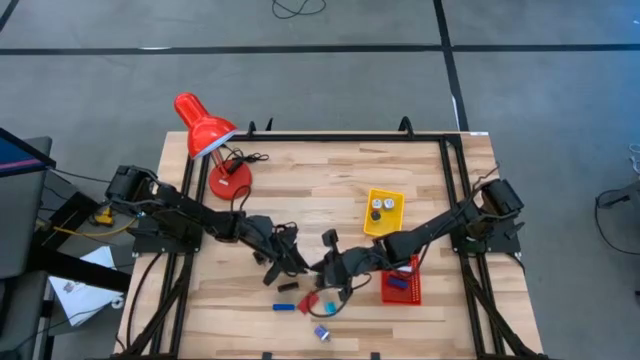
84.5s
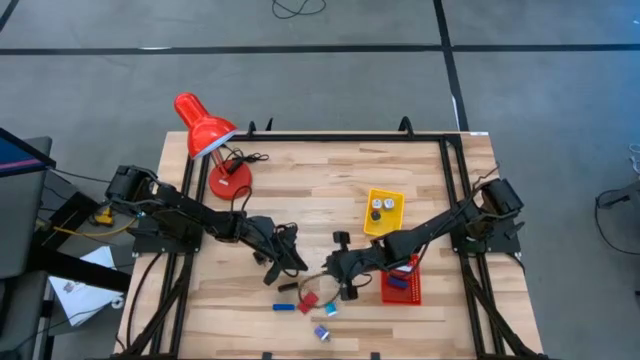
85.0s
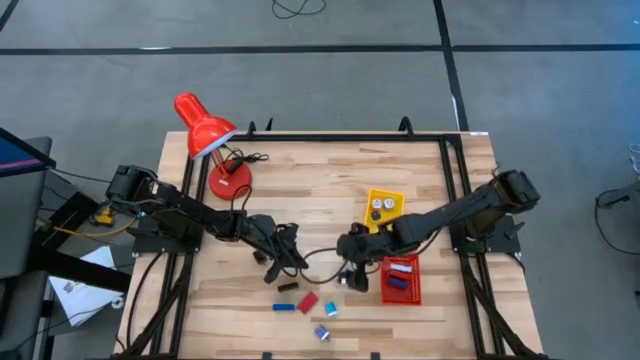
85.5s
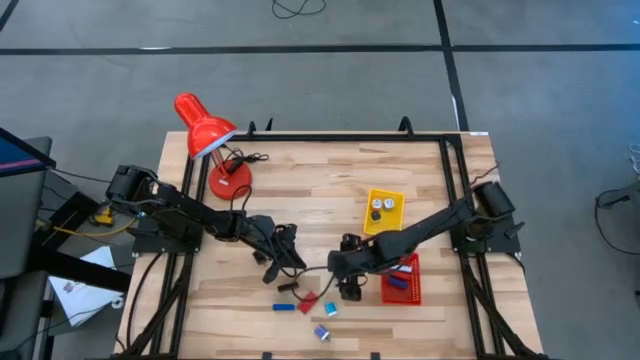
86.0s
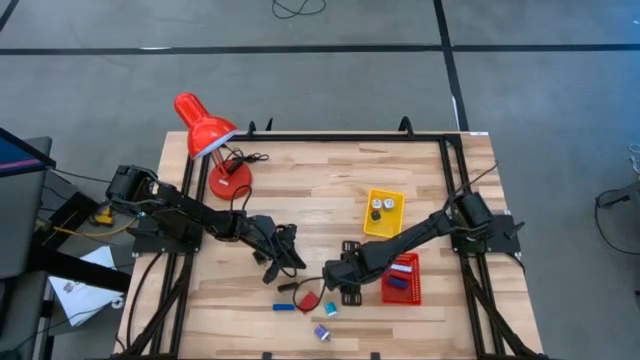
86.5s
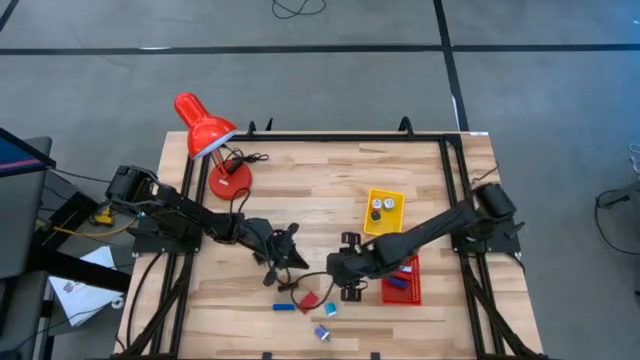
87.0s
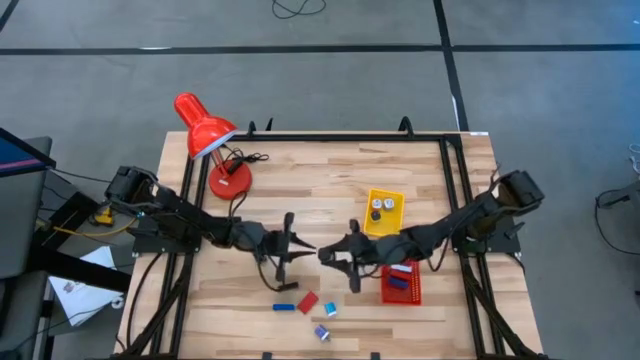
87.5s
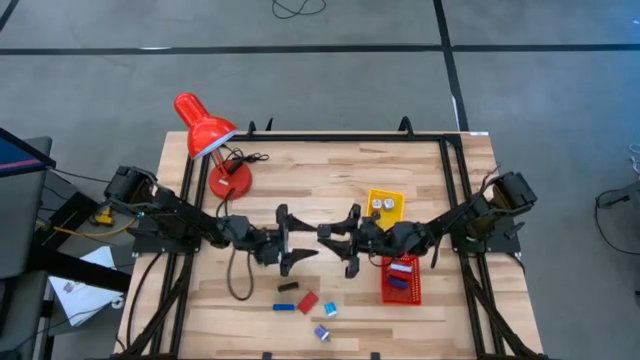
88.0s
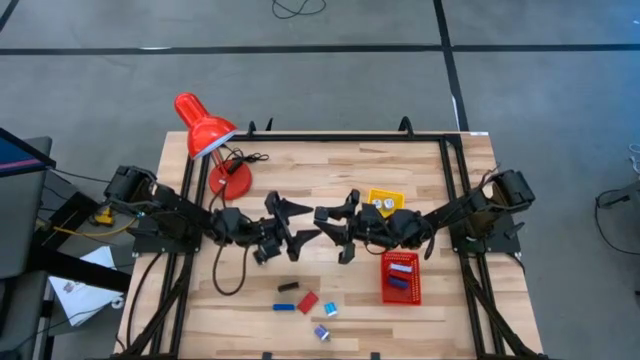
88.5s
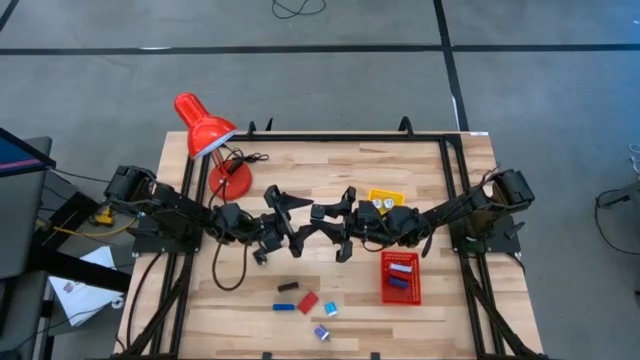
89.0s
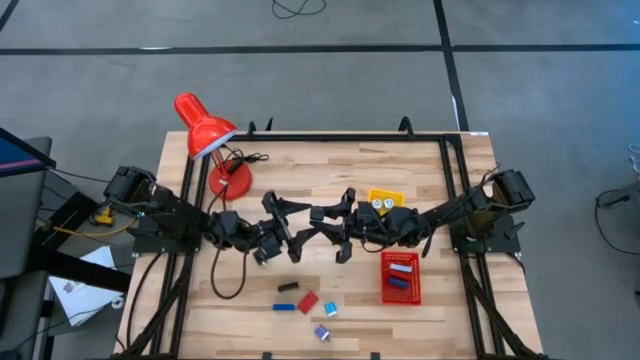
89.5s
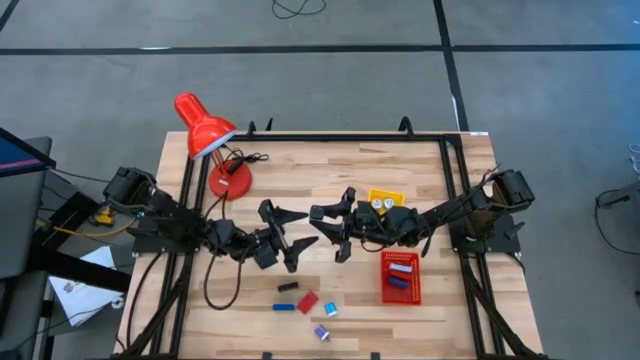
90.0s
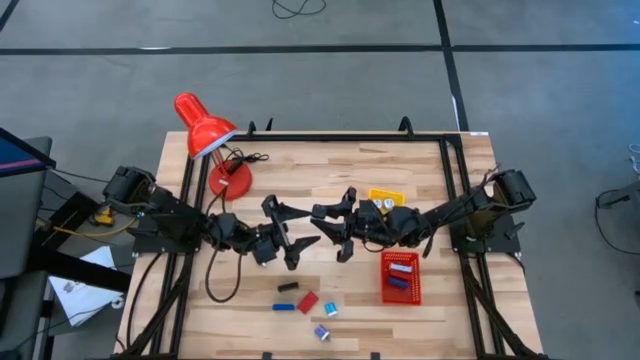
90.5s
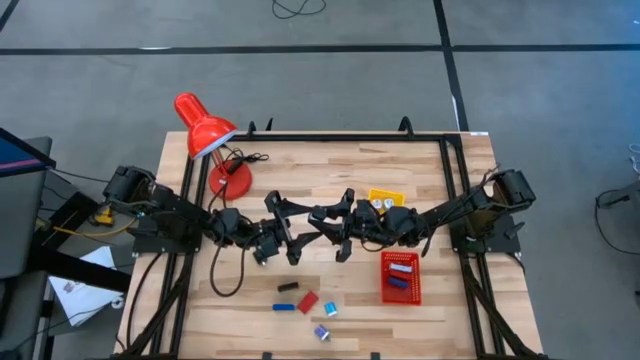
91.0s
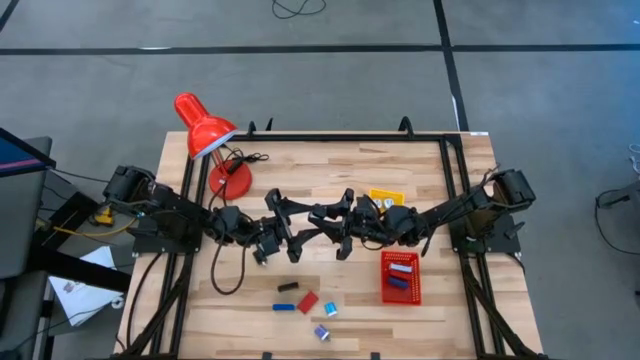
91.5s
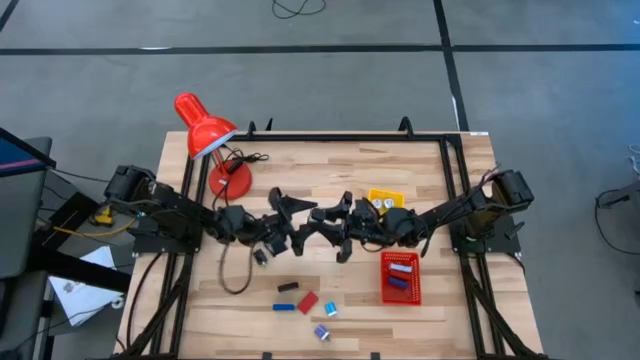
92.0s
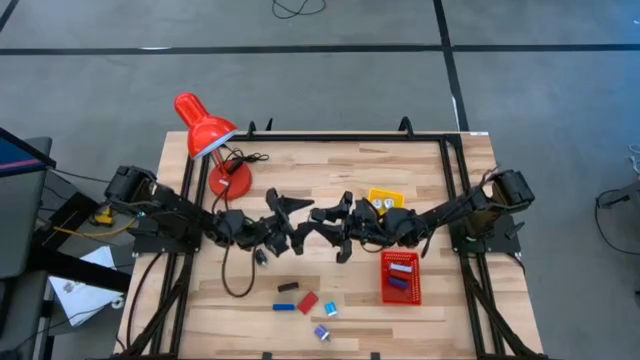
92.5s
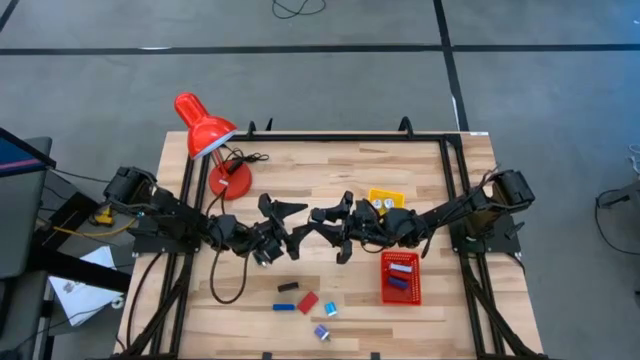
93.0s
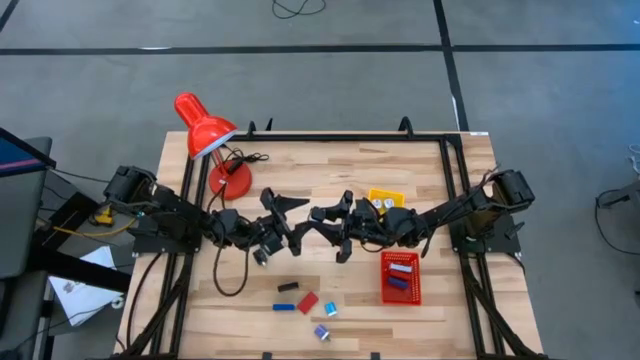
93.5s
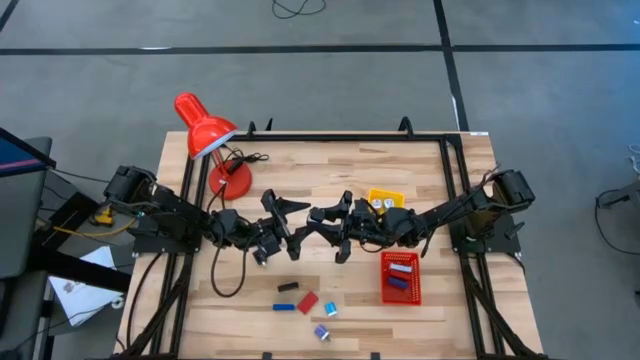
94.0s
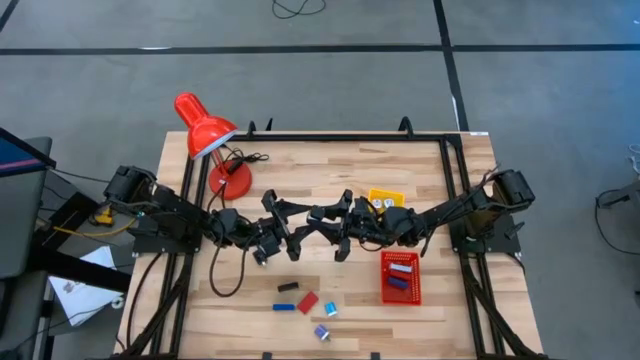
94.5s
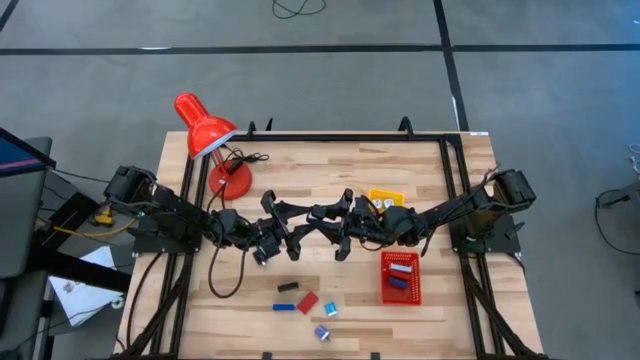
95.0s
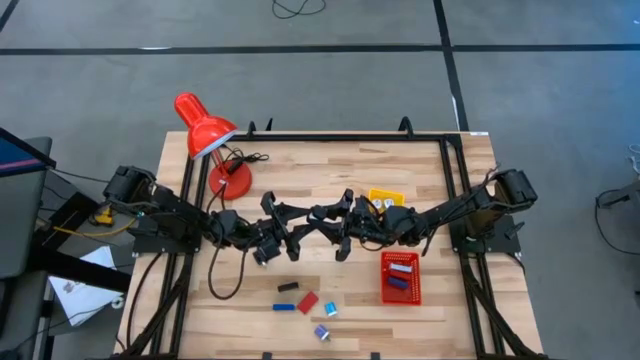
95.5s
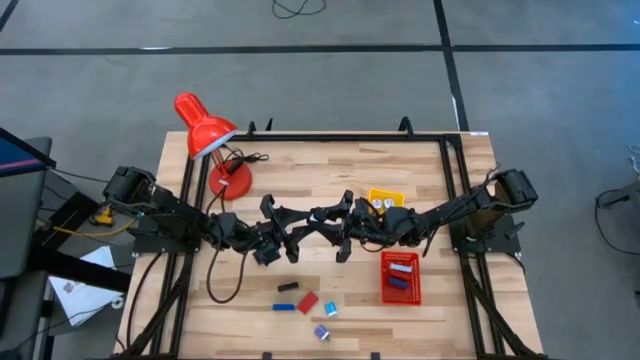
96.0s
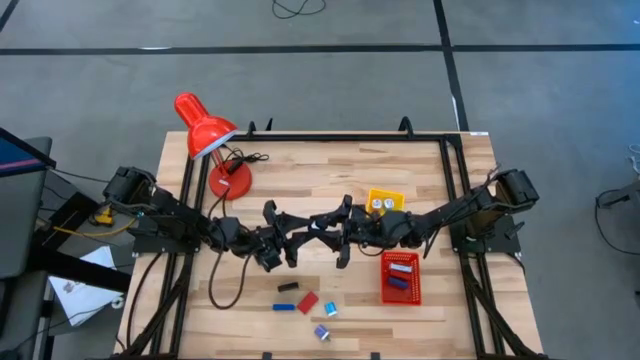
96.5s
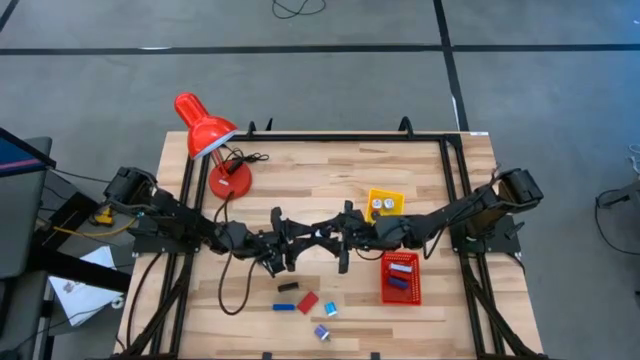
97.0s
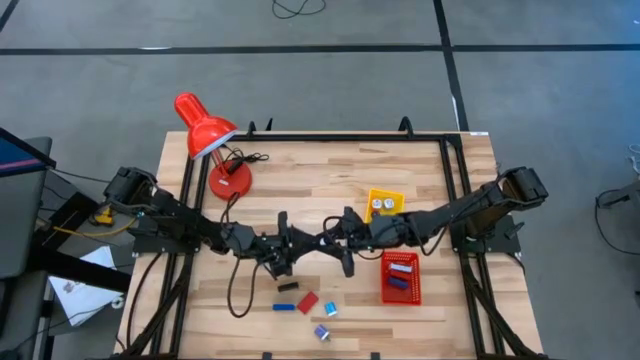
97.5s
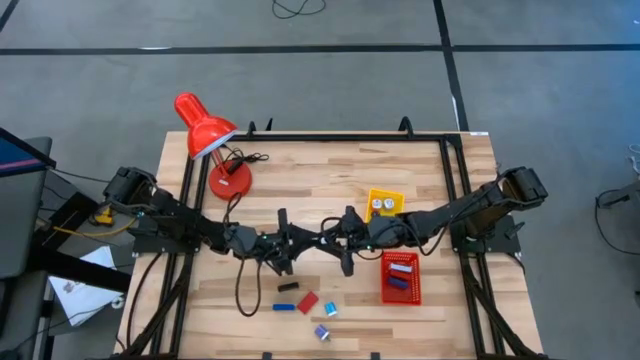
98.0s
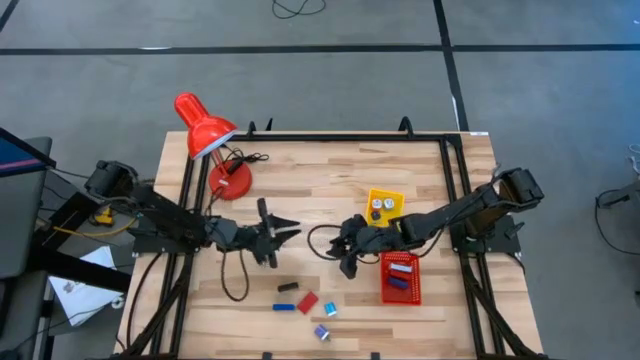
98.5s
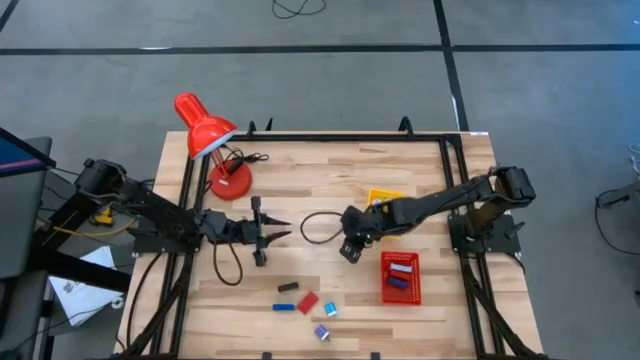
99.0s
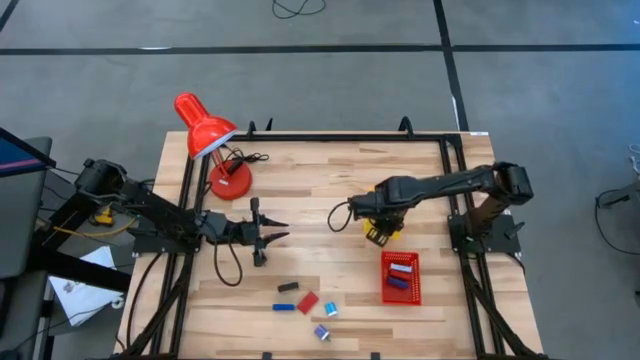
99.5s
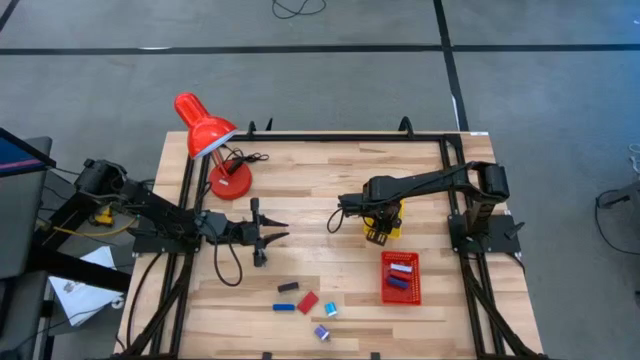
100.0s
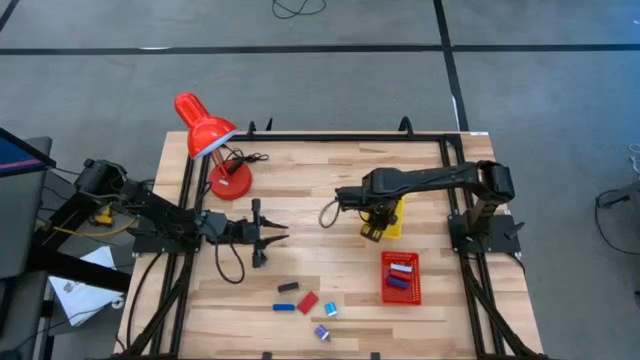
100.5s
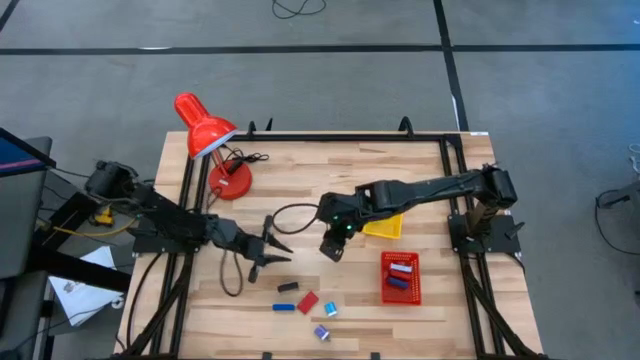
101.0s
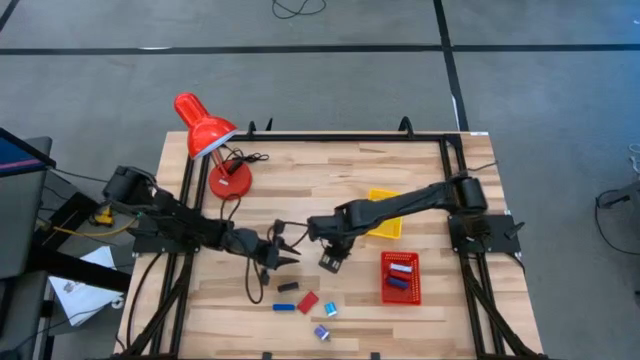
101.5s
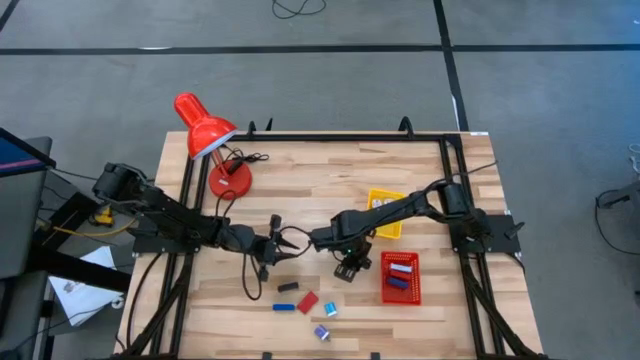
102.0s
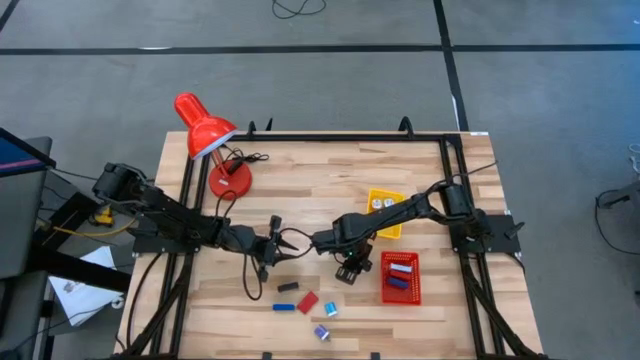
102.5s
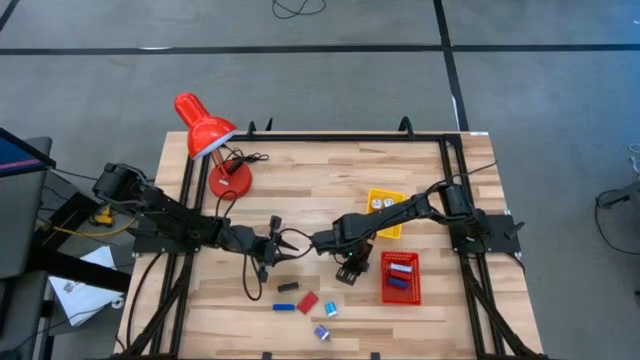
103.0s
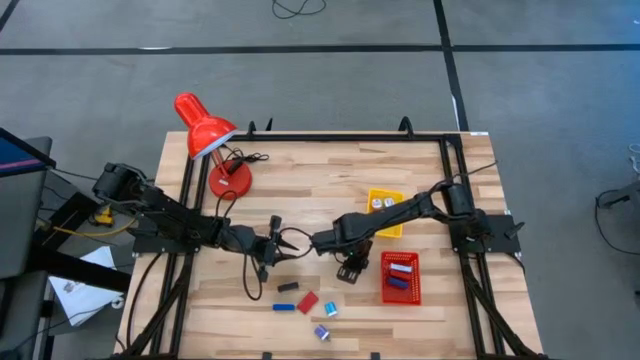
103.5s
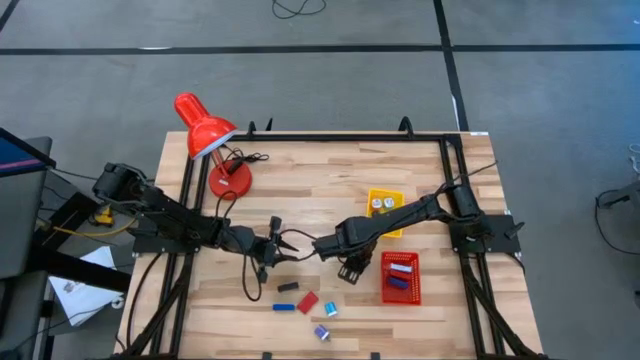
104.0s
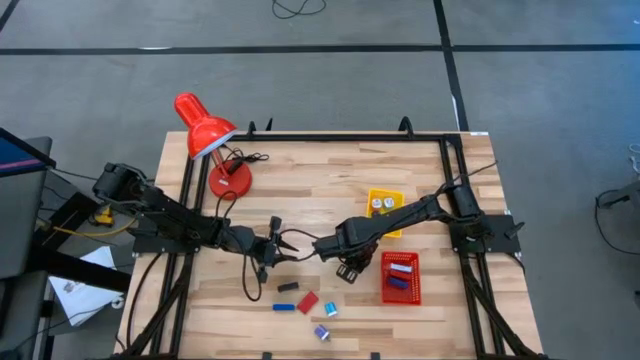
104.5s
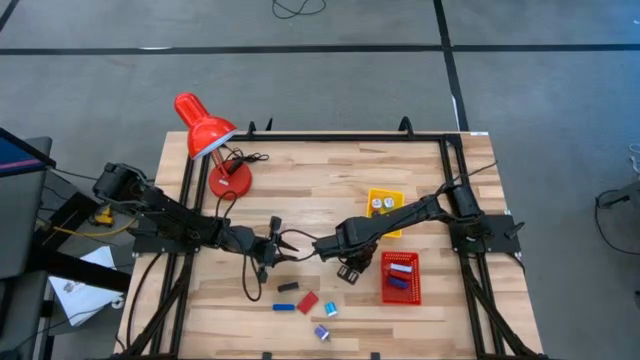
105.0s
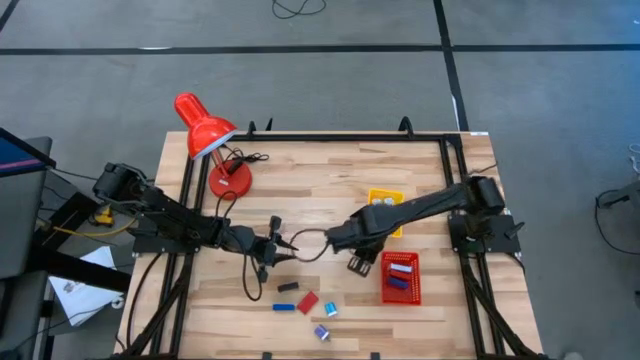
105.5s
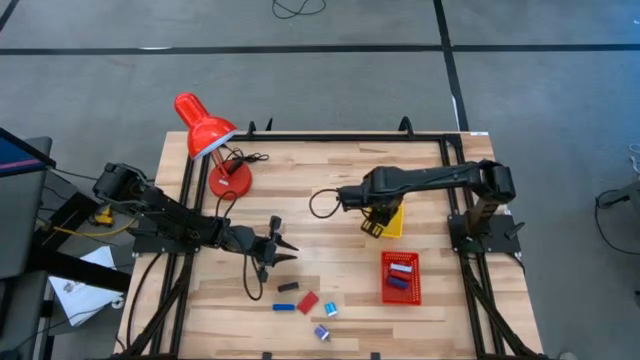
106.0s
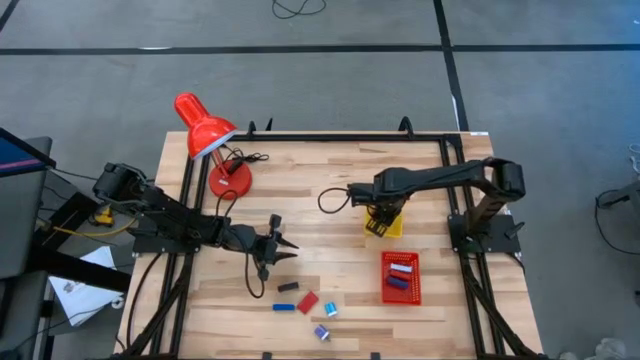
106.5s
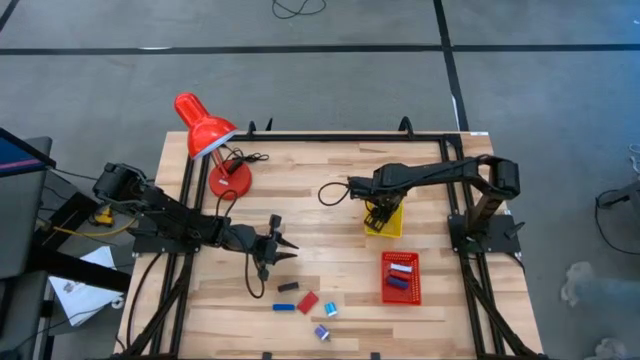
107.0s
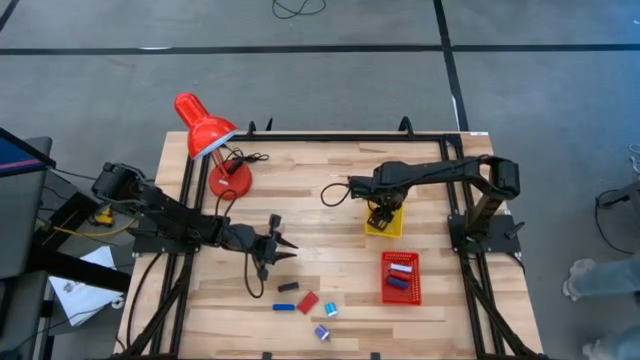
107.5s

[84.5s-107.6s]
Task: Pick & Place Office items
Put the top black charger adapter into the yellow bin
